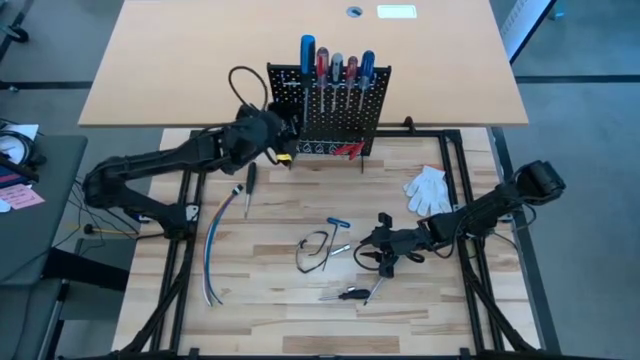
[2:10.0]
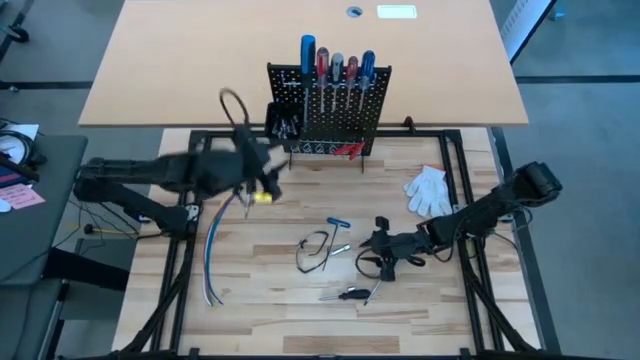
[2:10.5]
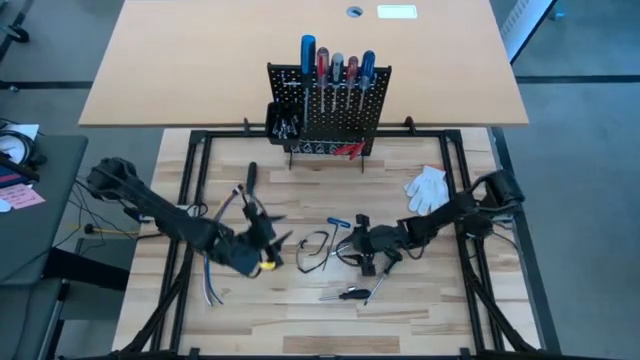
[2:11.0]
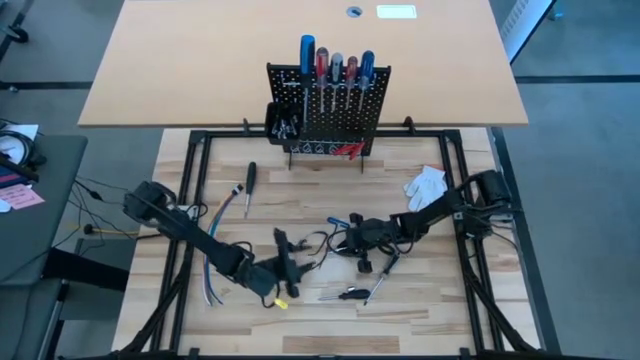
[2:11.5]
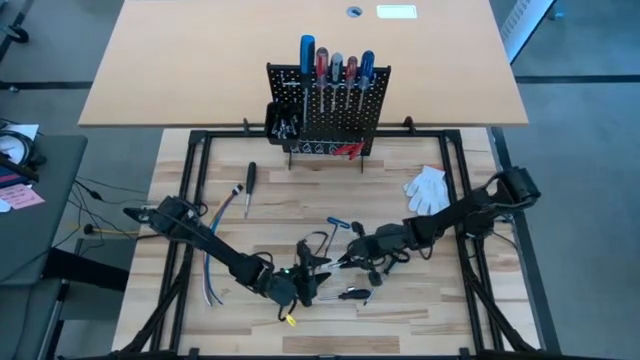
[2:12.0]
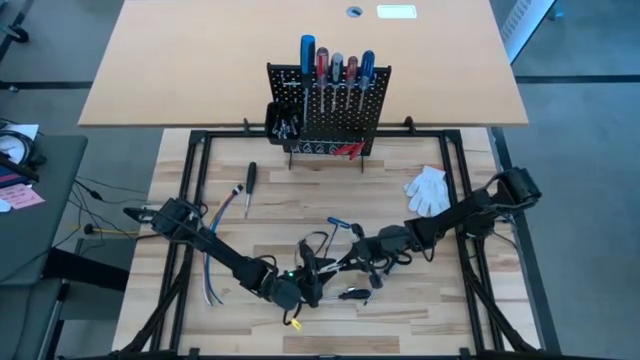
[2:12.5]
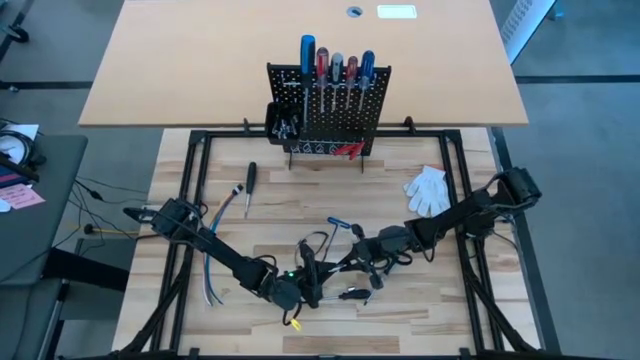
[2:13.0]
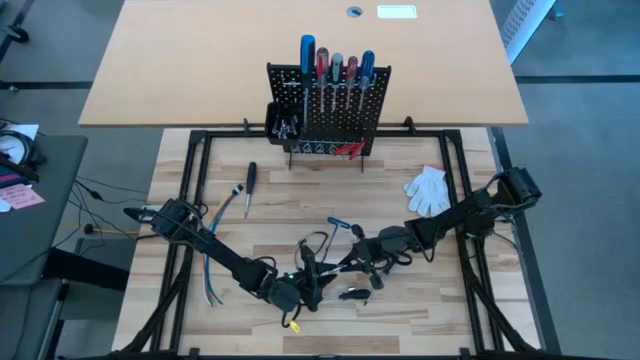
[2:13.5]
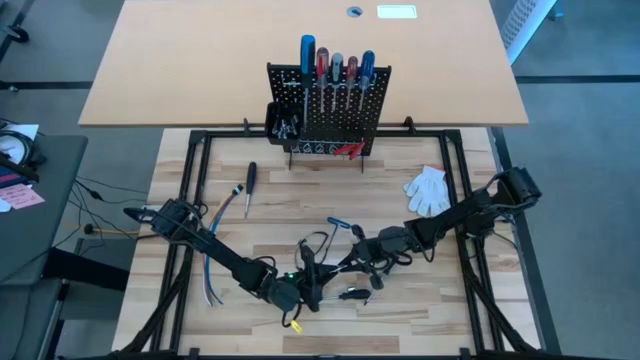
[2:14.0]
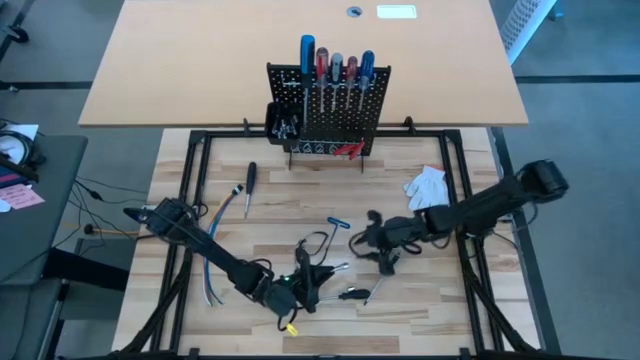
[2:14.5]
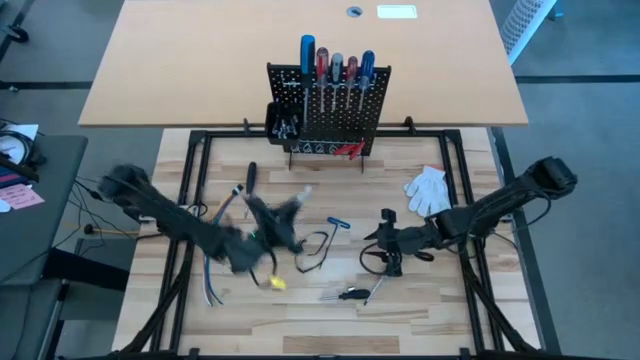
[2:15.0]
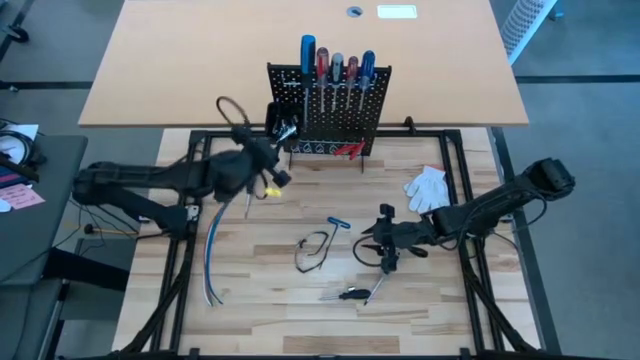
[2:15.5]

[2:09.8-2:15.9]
Task: Hang tools onto peg board
Put the silver extension bar into the black bin on the black pegboard

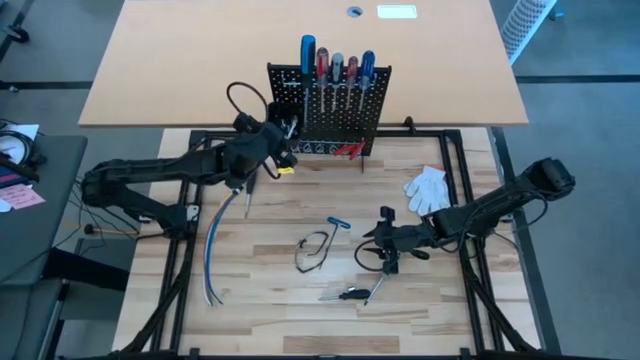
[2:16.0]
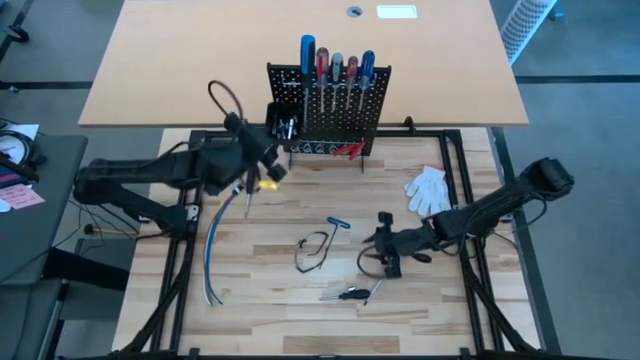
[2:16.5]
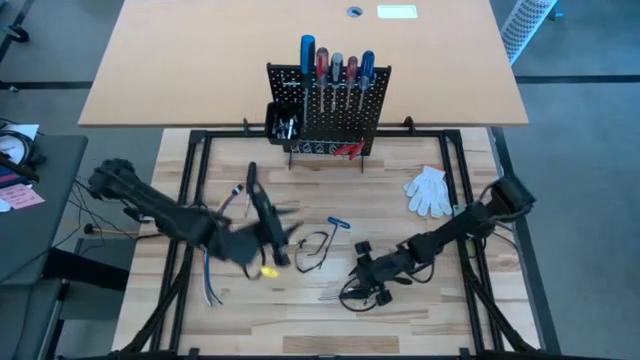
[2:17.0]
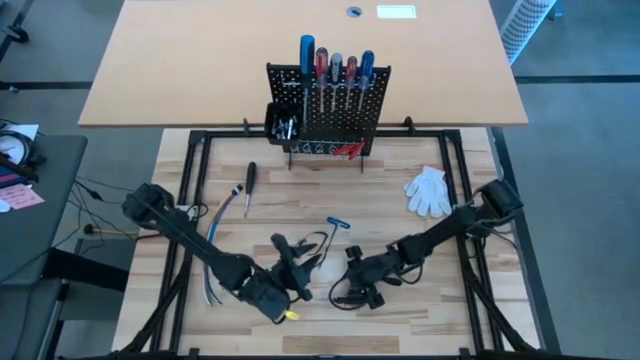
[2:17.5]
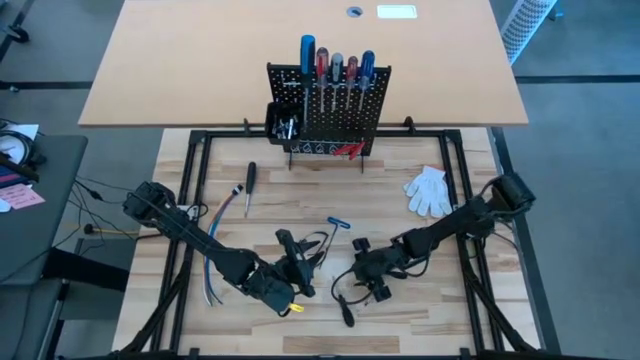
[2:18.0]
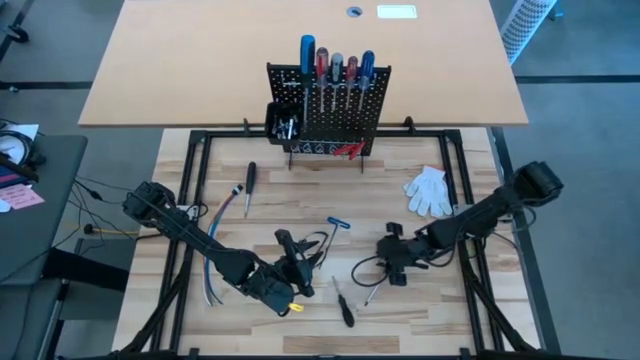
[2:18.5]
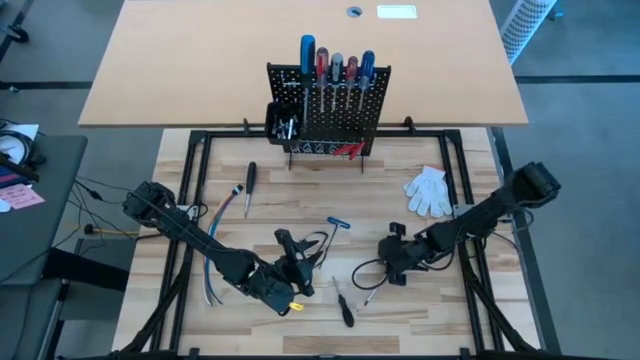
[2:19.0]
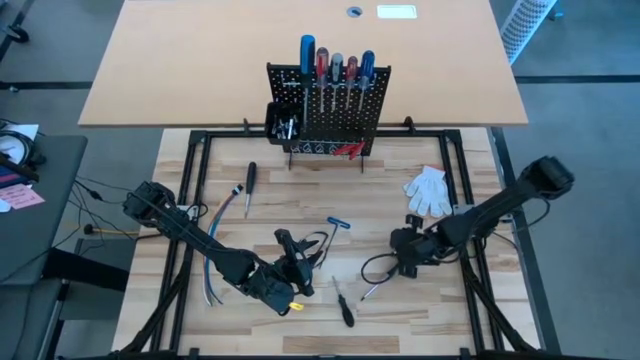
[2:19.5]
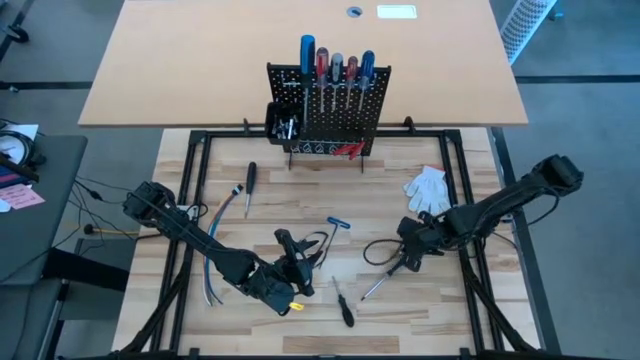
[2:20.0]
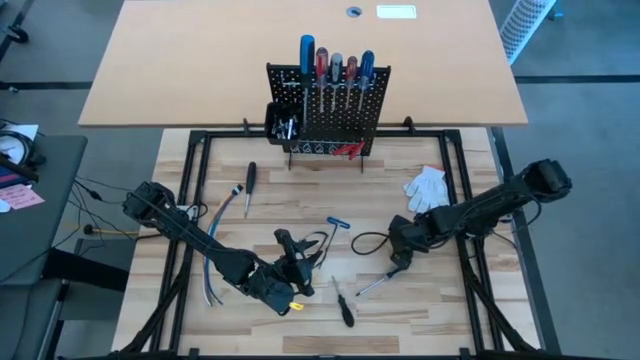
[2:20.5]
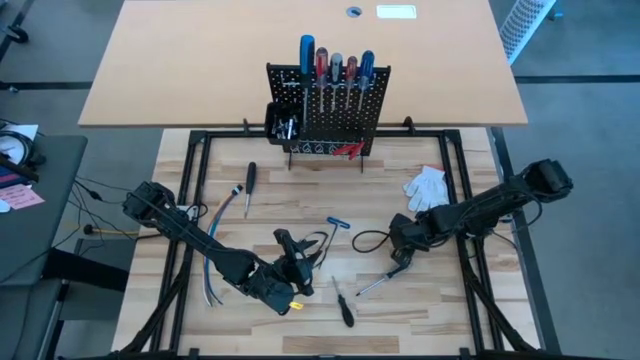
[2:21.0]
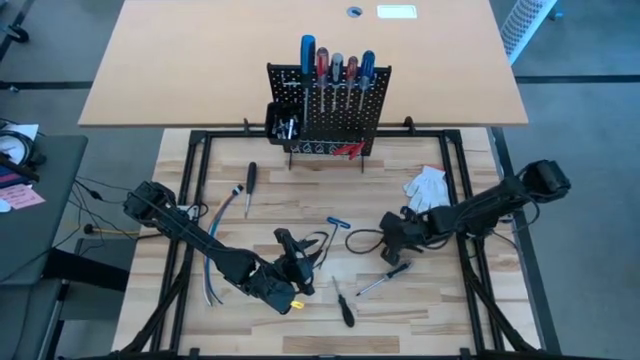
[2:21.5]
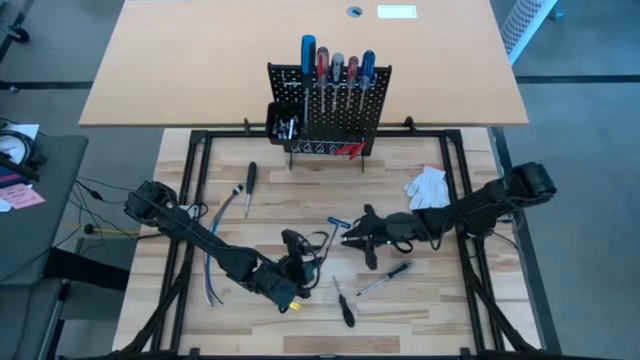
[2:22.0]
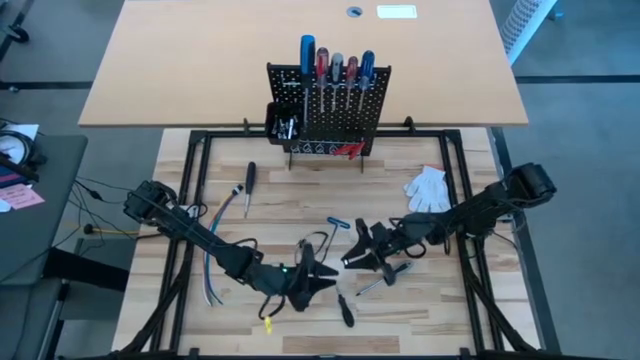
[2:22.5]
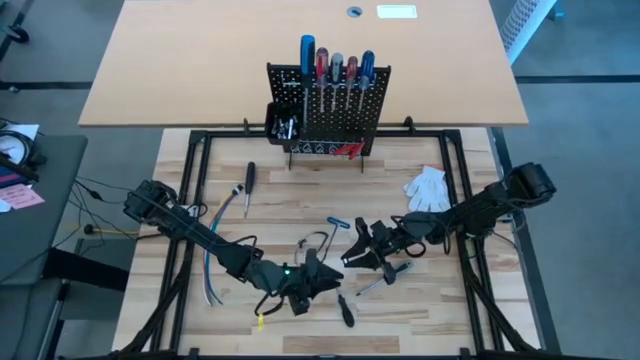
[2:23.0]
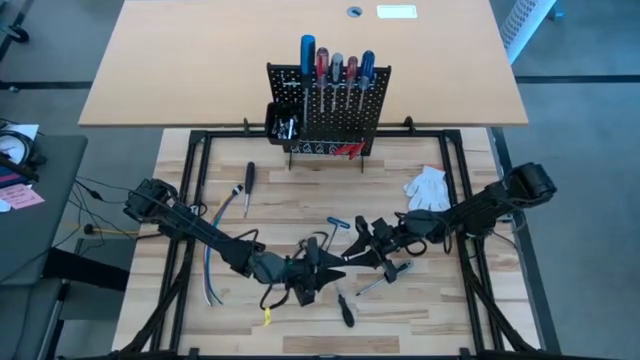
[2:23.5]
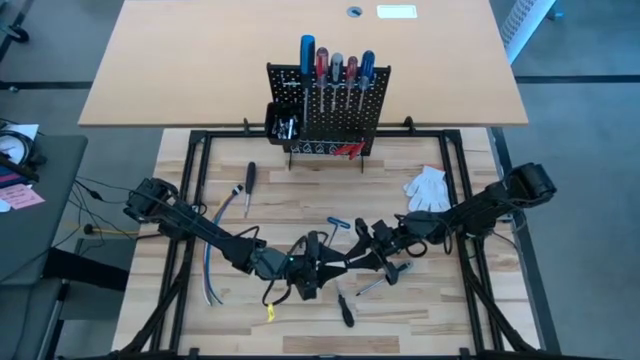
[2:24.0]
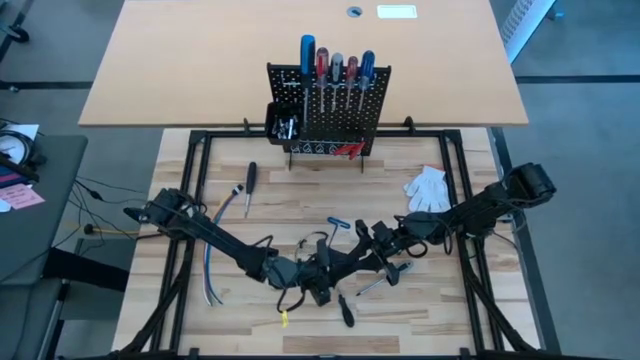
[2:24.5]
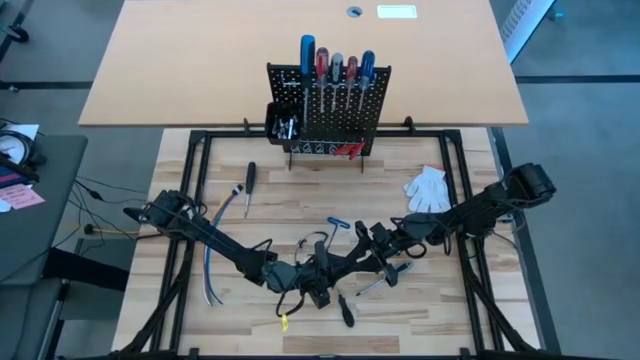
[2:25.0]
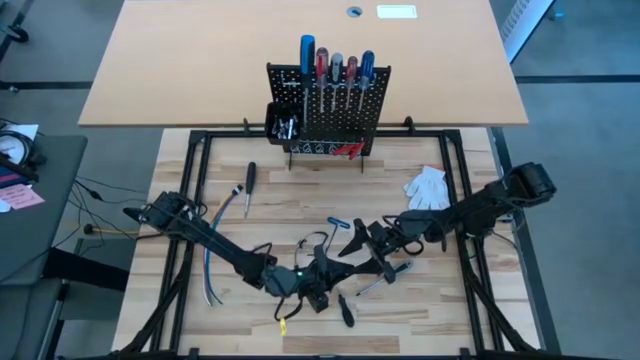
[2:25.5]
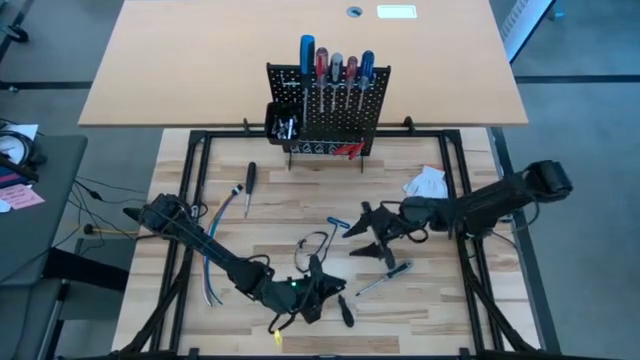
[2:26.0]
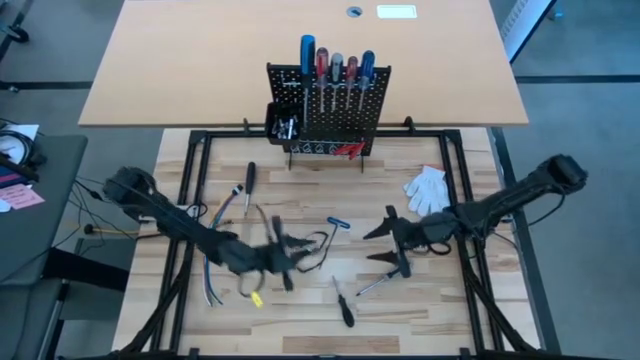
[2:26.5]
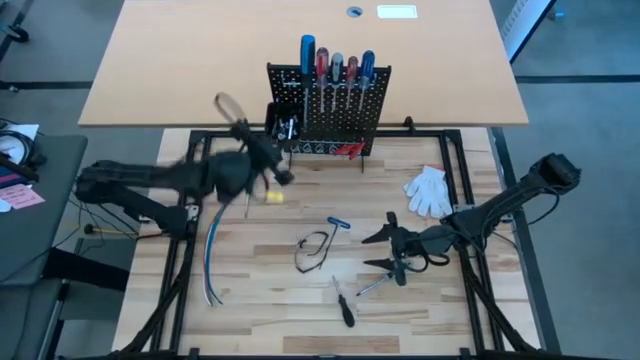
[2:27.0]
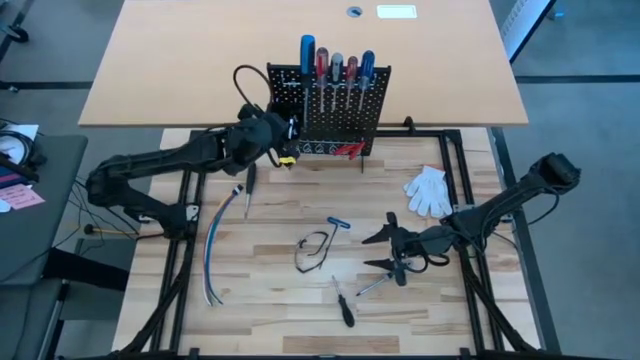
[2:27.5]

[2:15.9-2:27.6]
Put the silver socket into the black bin on the black pegboard

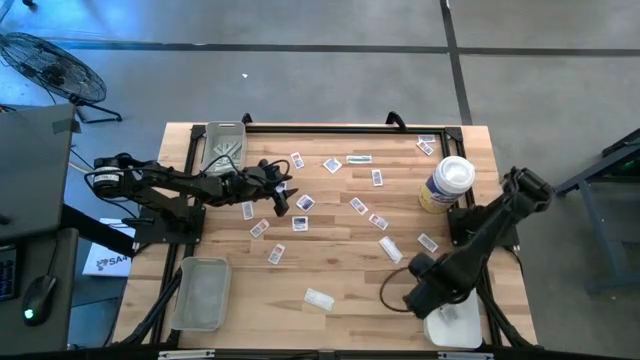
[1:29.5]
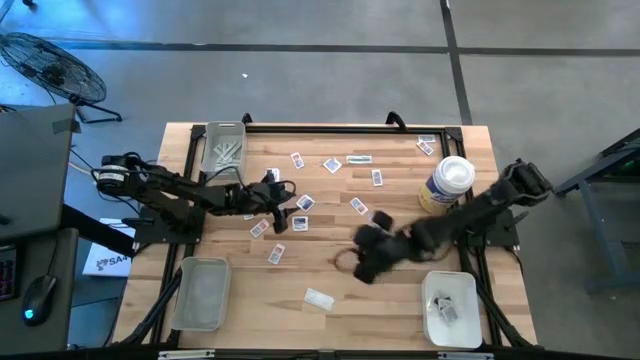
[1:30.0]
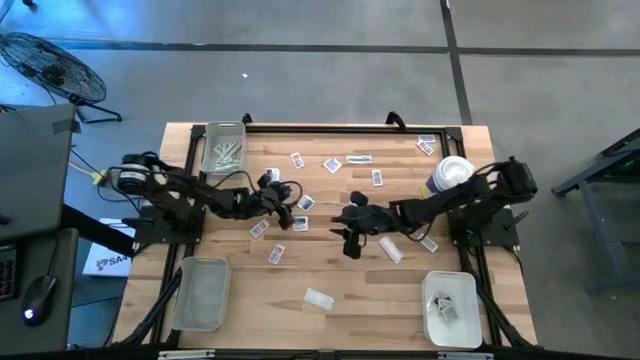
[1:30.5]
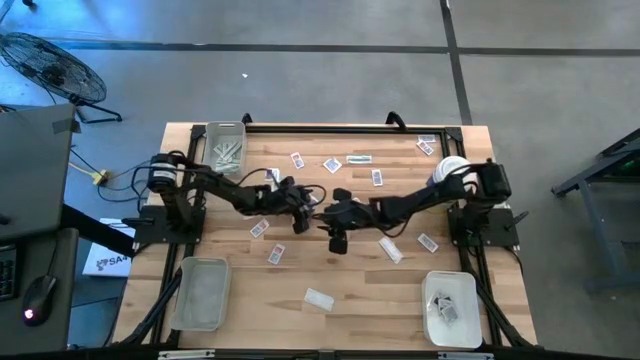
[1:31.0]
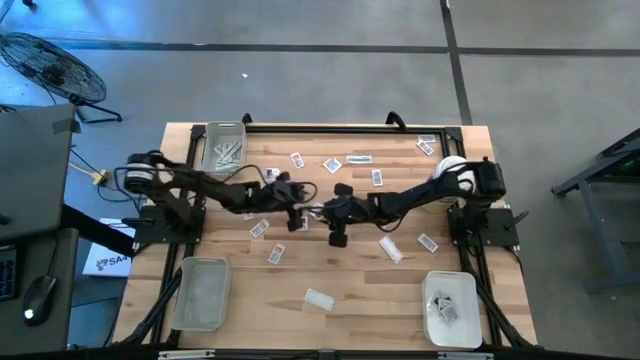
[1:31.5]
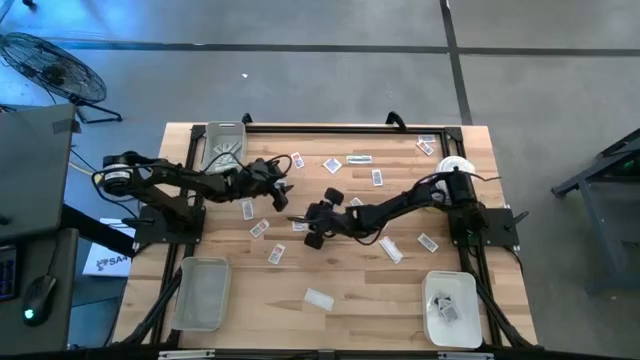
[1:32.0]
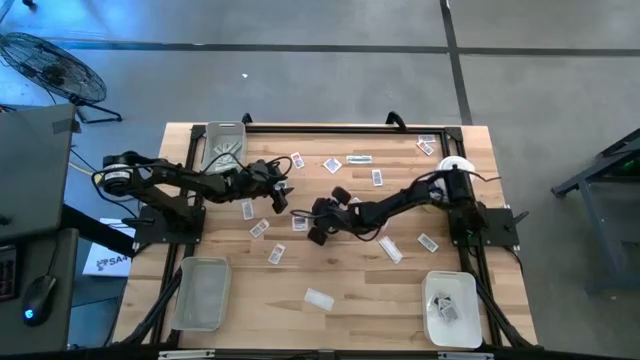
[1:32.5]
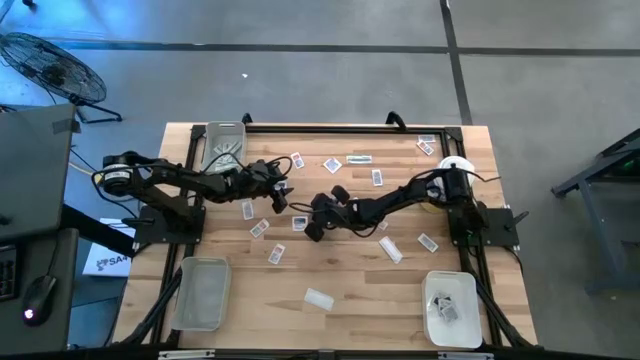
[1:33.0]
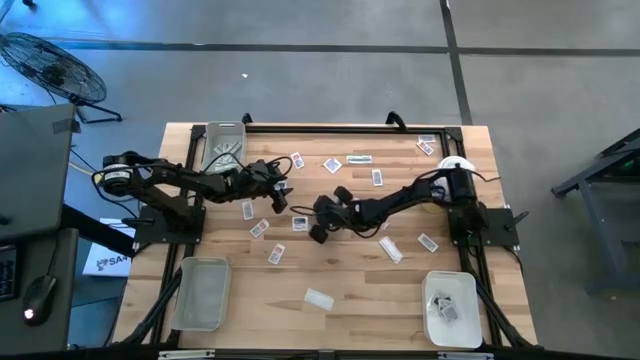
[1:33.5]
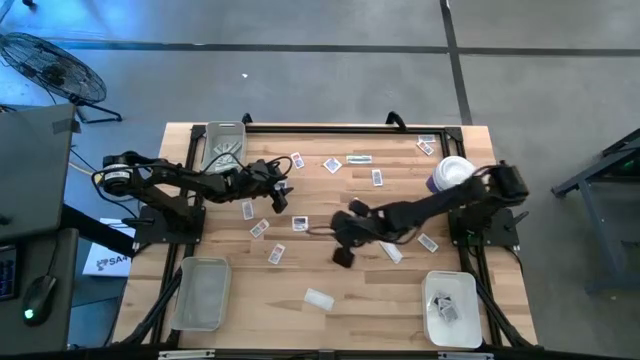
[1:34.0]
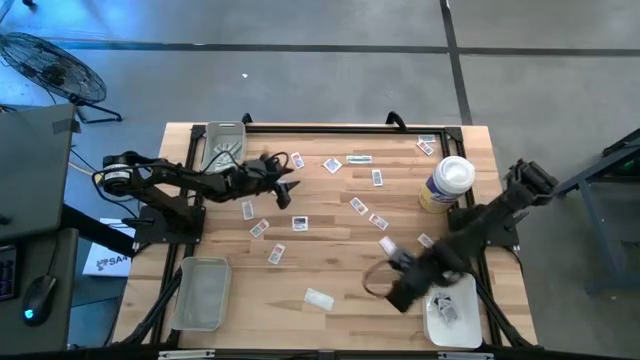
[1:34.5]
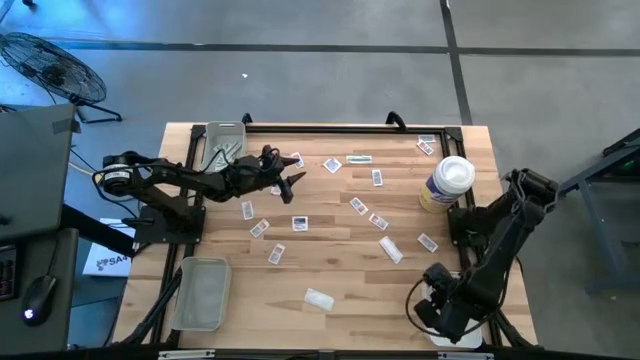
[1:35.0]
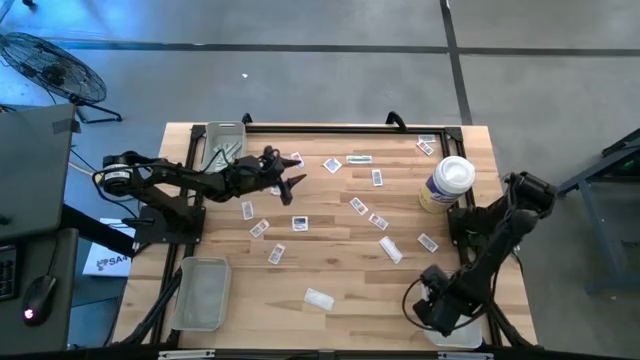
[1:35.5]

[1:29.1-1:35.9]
Task: Pick & Place First Aid Supplies
Put the blue alcohol pad into the white bin
